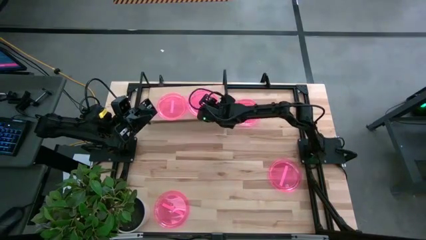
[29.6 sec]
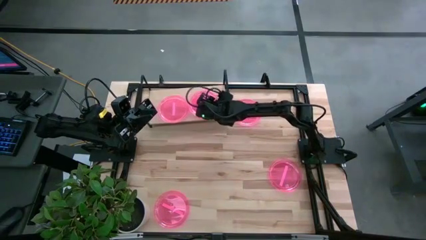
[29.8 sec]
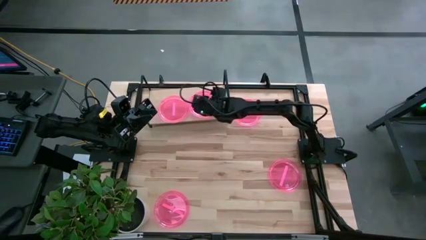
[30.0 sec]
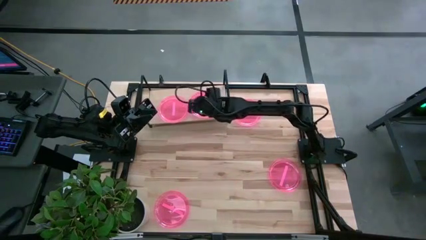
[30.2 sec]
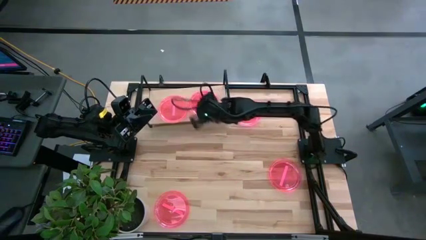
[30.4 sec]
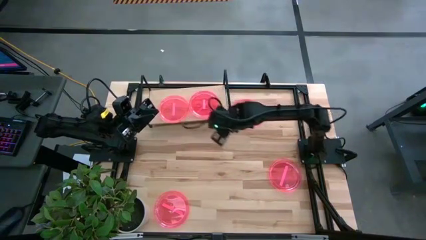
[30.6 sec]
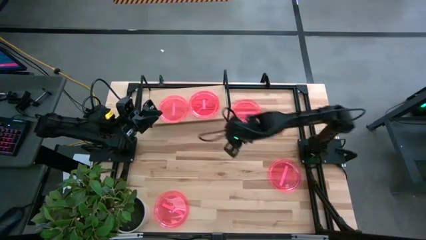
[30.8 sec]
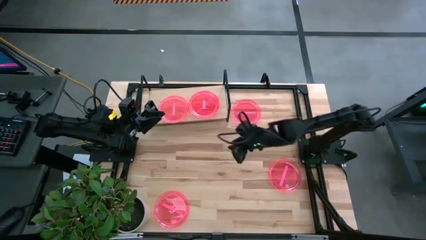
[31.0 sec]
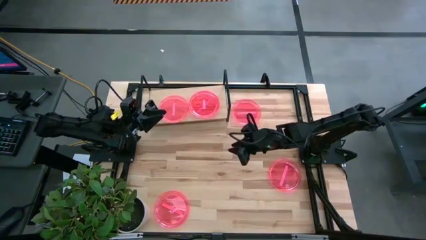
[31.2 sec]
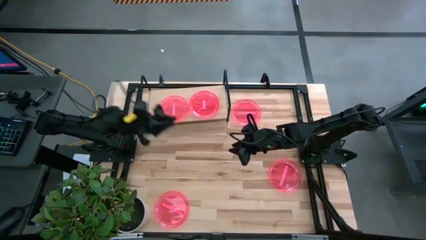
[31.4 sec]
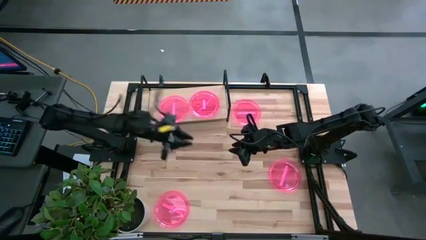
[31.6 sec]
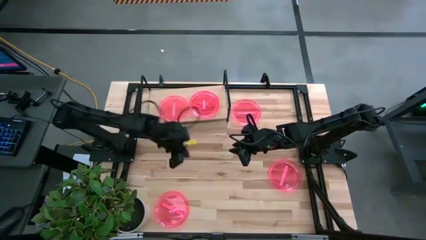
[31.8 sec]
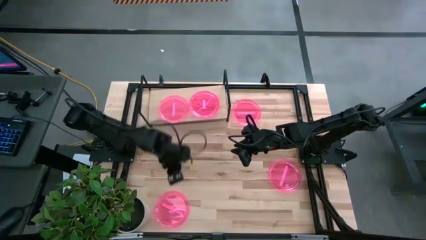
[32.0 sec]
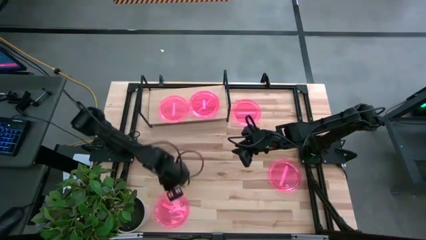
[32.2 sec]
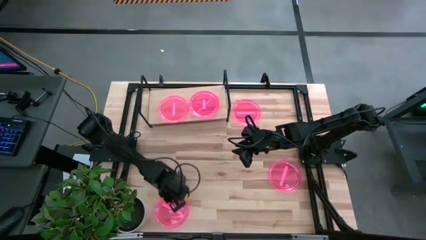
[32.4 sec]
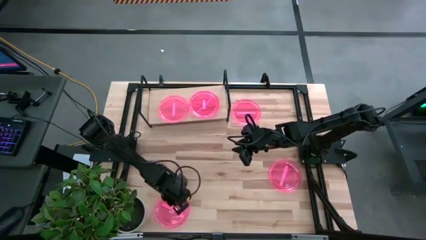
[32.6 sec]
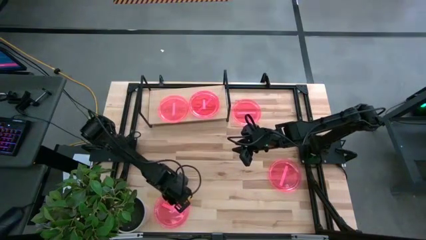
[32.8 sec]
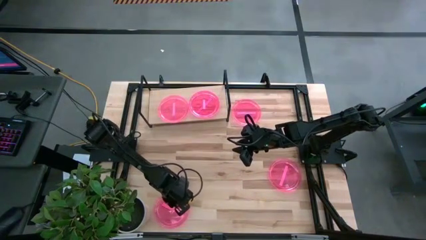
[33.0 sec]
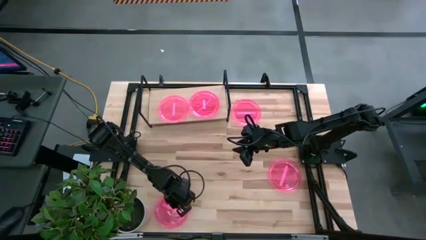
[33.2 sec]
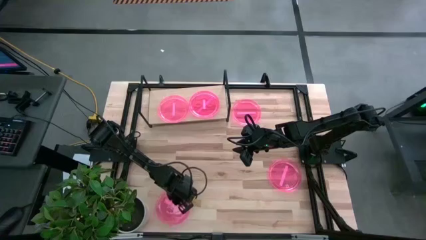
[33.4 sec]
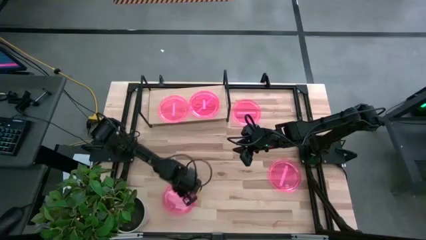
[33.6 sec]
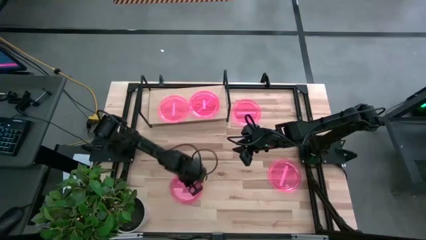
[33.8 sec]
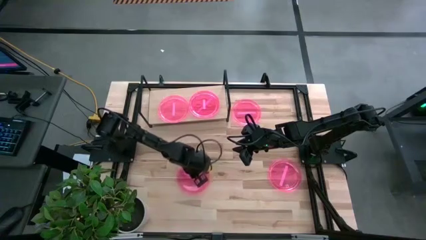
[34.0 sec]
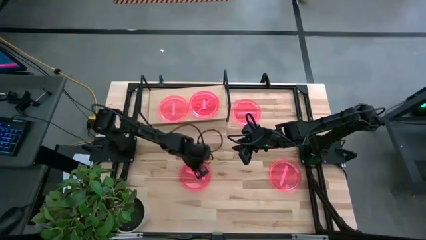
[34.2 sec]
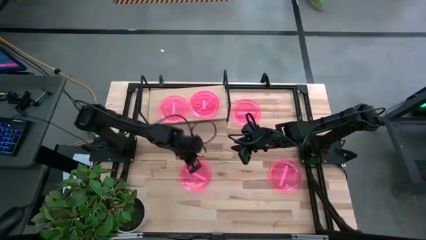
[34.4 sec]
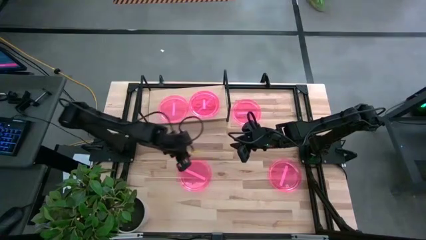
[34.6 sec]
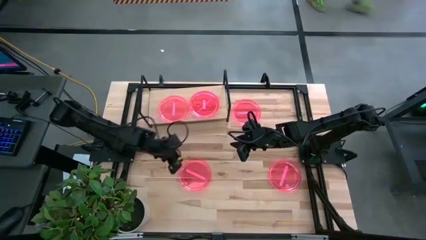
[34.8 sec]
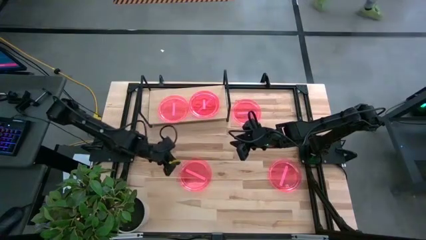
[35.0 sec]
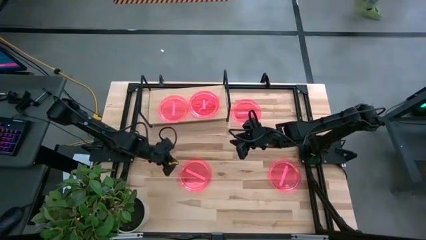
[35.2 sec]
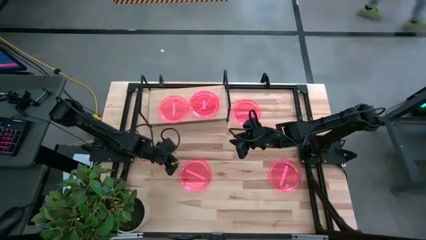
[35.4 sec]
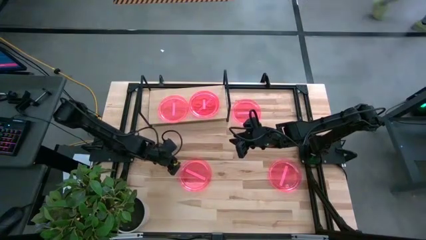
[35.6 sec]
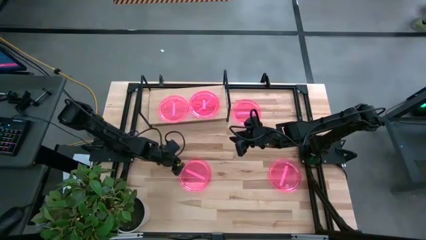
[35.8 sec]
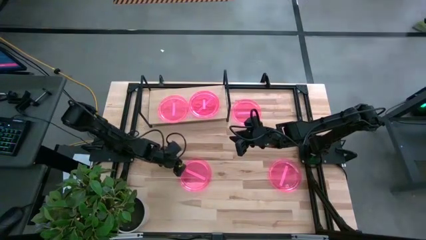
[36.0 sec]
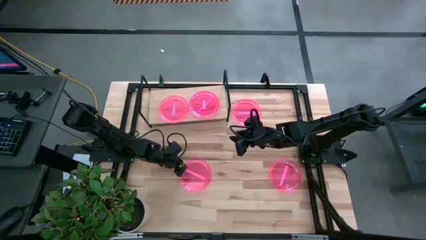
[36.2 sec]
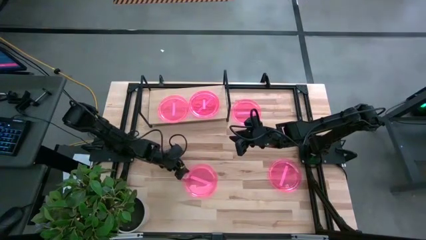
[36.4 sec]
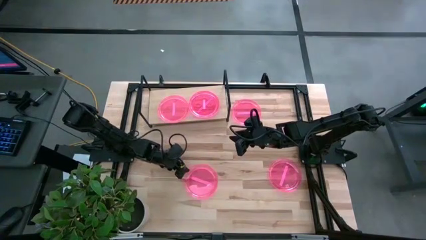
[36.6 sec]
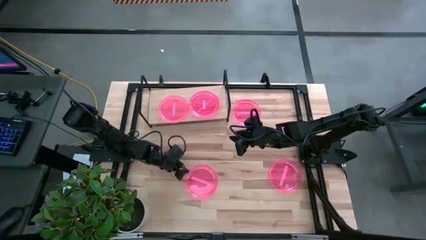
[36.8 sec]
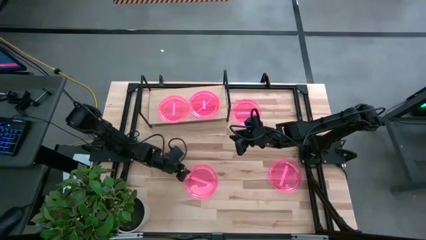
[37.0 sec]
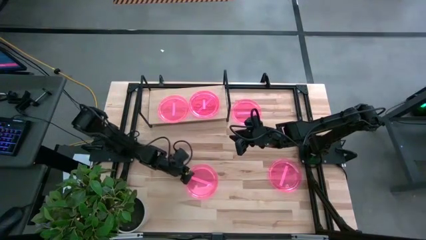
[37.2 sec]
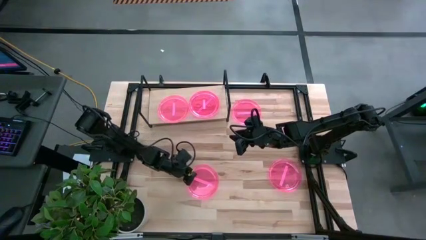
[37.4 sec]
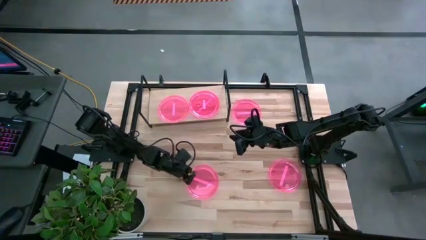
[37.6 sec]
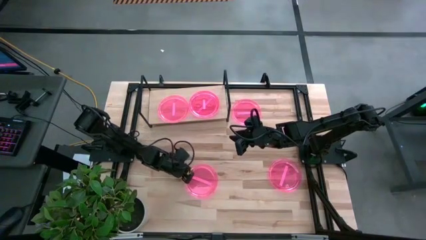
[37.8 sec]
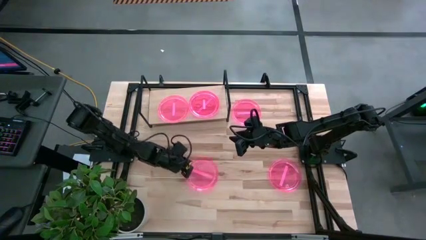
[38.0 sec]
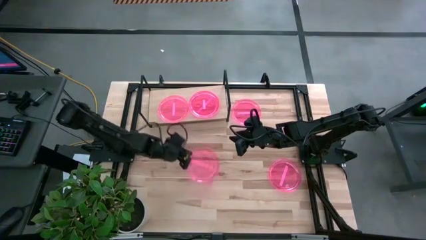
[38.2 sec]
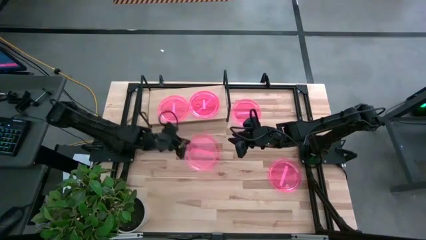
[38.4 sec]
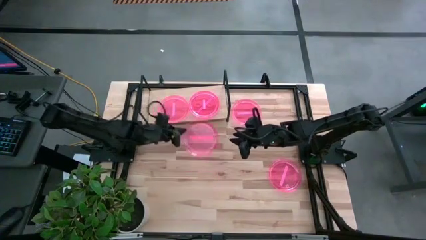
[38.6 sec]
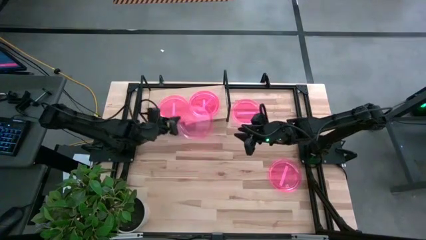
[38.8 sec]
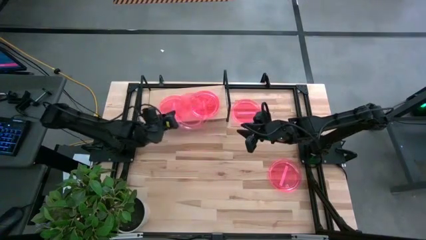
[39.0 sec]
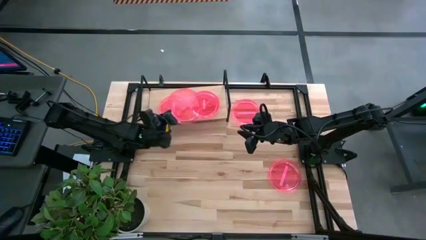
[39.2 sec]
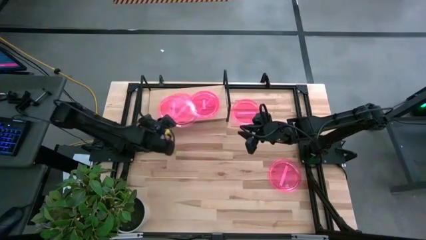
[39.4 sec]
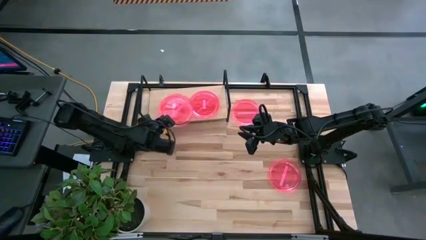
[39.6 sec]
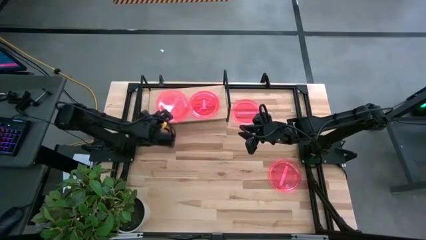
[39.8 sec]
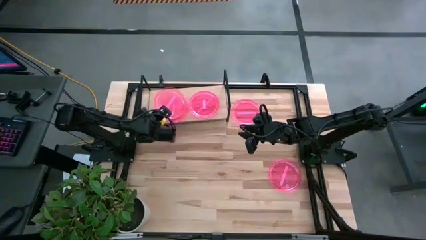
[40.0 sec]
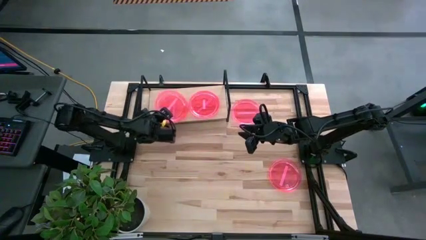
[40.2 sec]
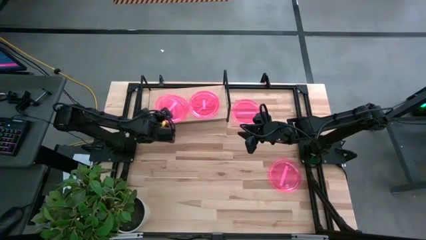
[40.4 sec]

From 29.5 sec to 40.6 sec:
Task: Place and stack plates onto a shelf
Stack the pink plate on top of the pink plate on the shelf

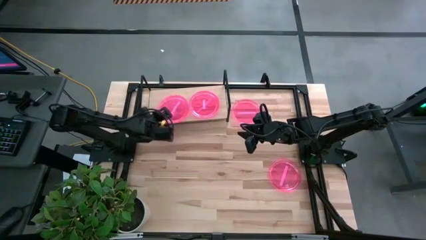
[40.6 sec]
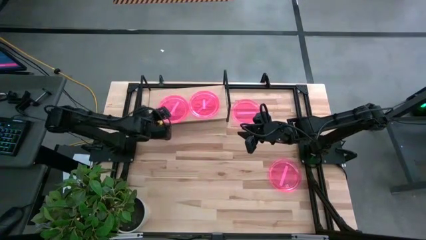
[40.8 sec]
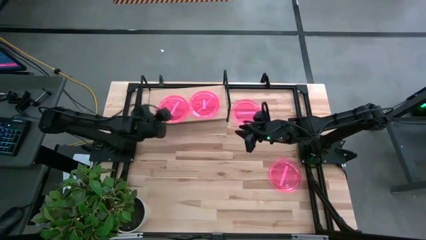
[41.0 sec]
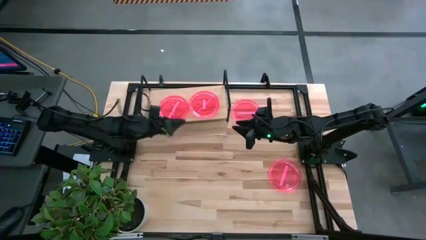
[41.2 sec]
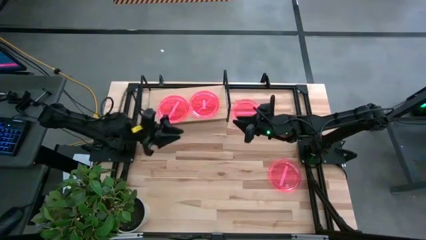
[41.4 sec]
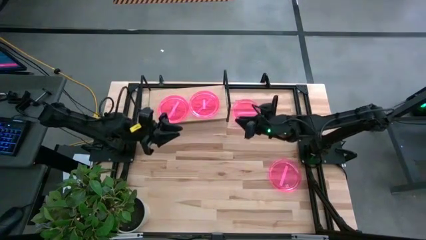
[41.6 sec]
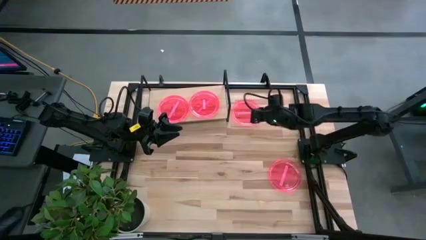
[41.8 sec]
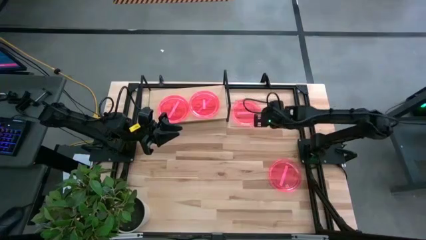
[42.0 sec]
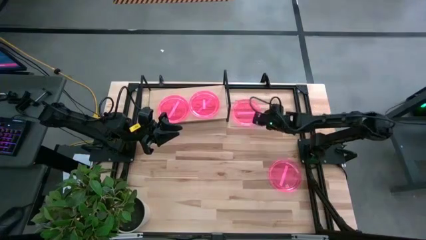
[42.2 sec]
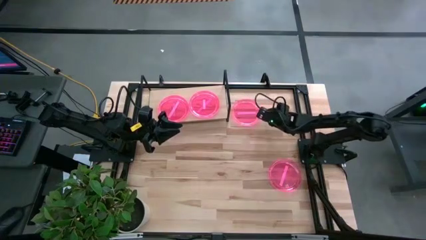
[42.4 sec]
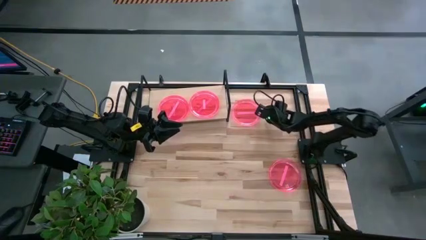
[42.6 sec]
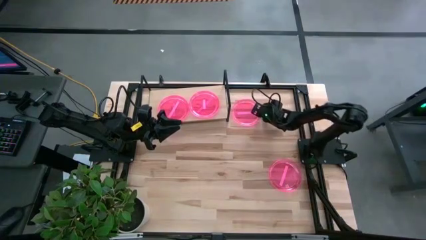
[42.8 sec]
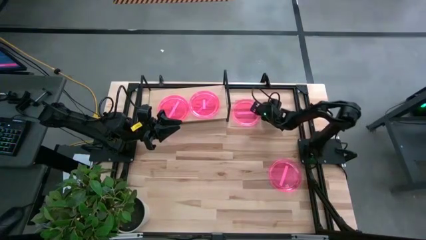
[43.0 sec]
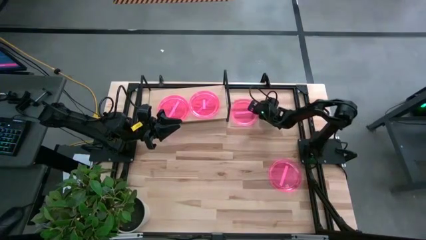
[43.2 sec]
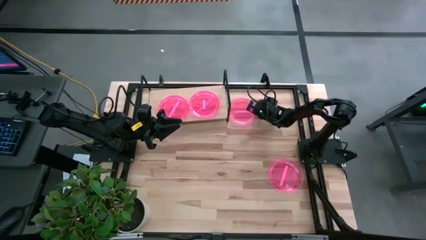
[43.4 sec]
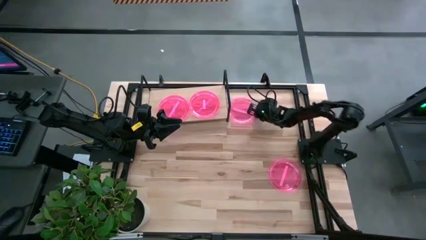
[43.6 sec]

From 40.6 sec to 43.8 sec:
Stack the pink plate on top of the pink plate on the shelf

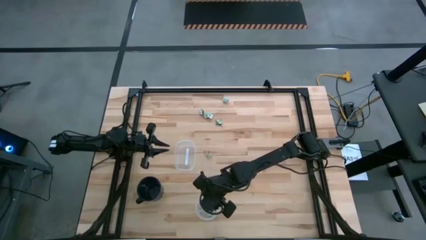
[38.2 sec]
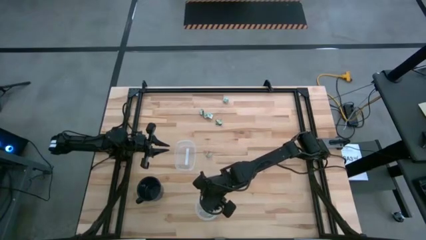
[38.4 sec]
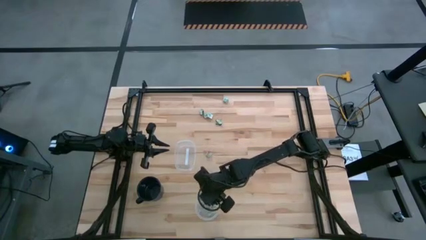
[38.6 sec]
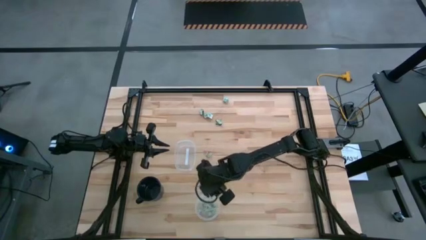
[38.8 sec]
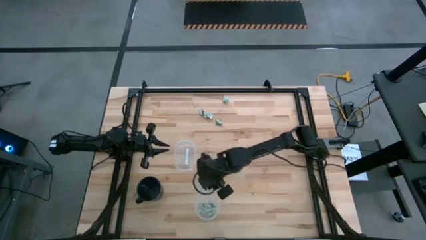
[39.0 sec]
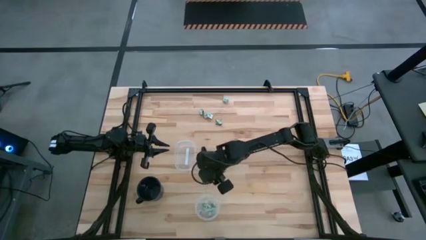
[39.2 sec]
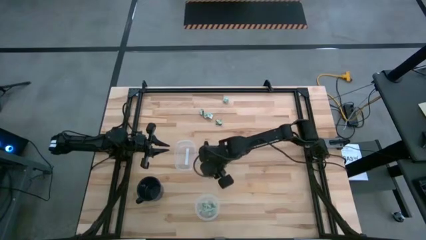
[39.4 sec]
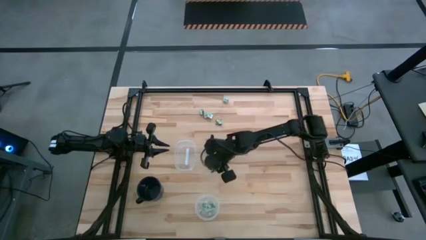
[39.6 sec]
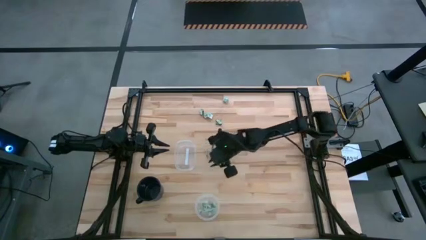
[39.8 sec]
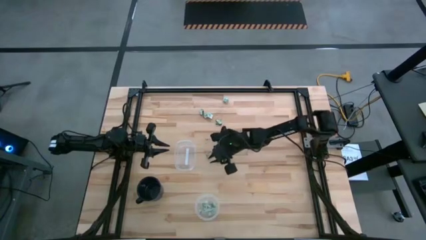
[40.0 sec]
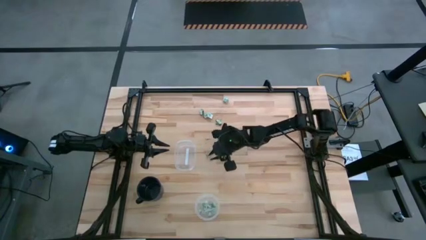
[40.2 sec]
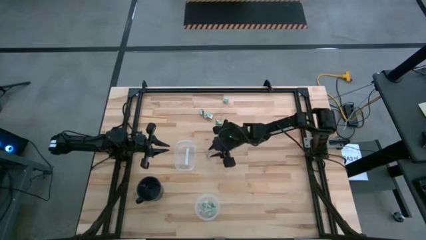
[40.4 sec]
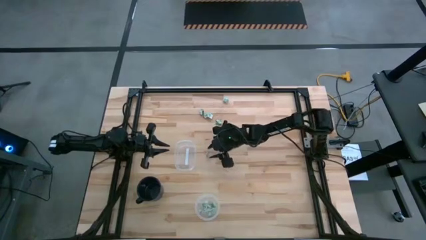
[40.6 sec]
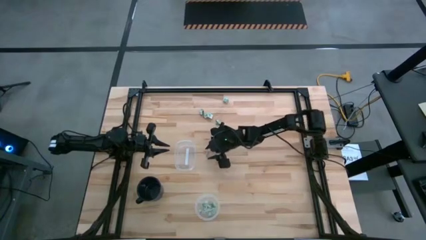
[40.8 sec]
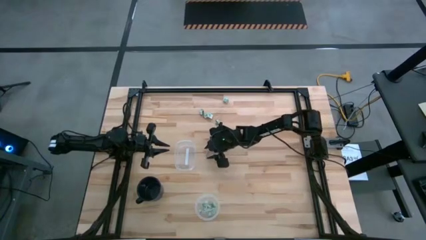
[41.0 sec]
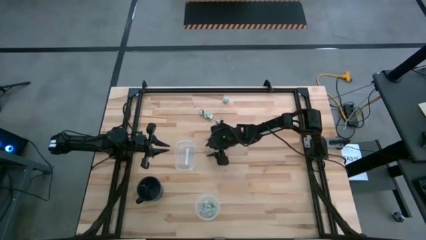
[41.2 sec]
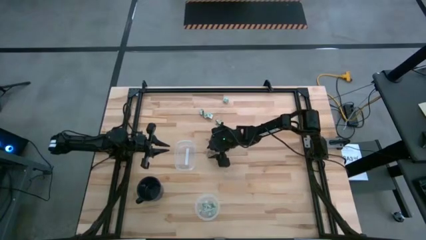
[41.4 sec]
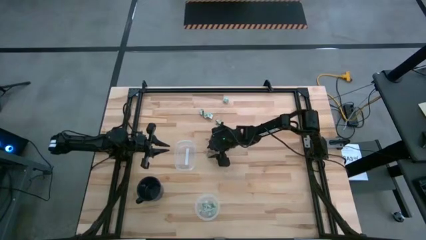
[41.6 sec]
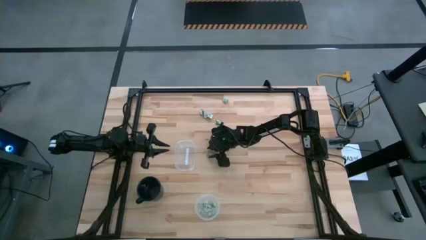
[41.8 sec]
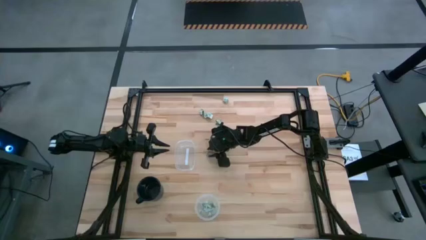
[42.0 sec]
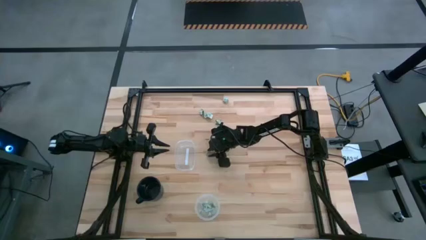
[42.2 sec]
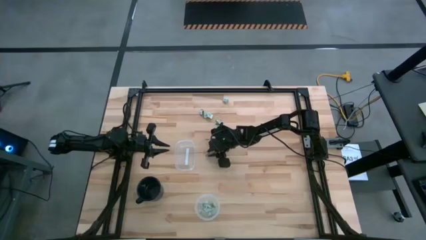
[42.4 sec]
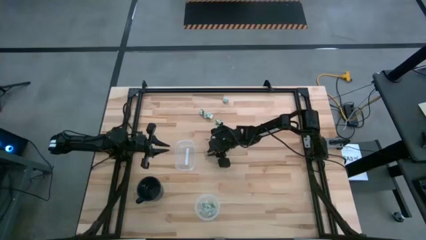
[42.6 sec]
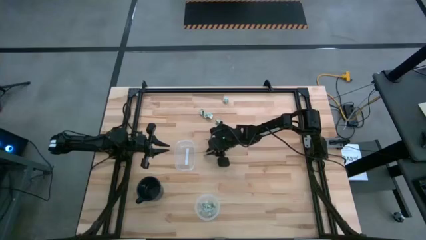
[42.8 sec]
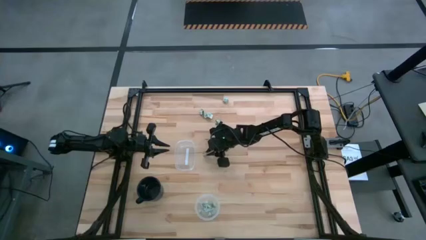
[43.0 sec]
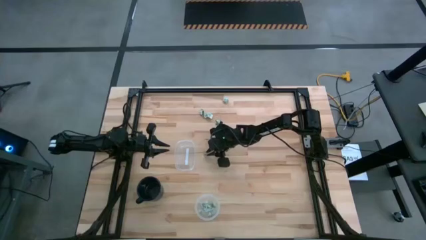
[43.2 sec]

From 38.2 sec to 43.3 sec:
Task: Pick and place Stevia / Truvia into bins
Put the stevia packet into the round transparent container
